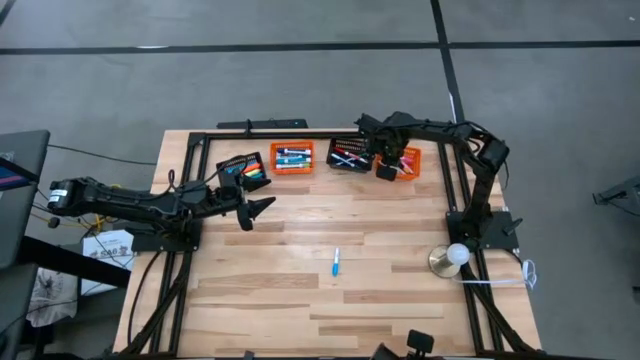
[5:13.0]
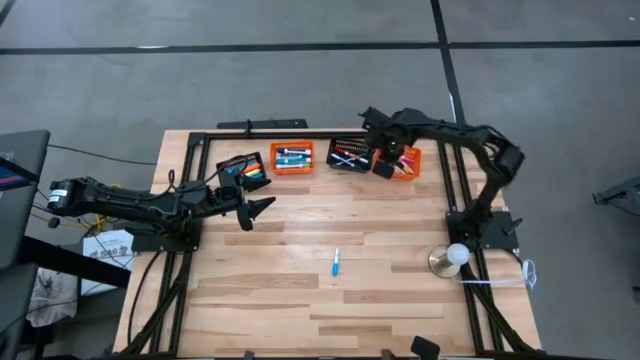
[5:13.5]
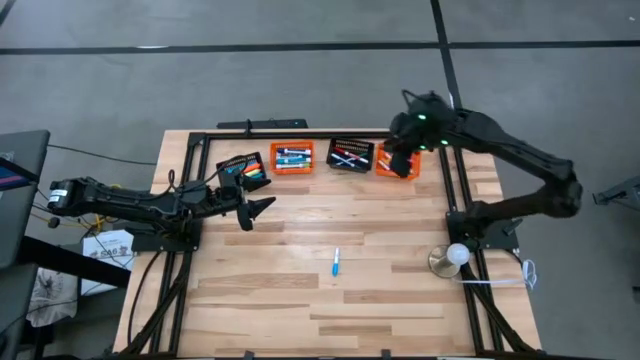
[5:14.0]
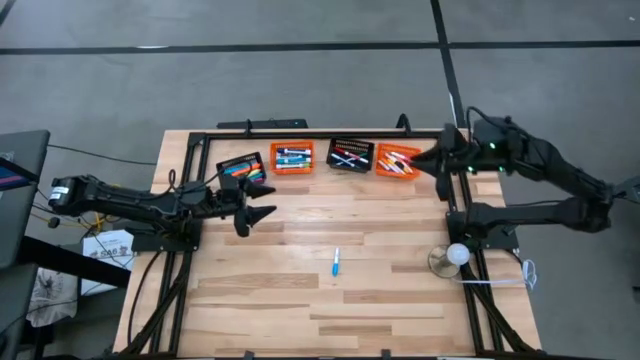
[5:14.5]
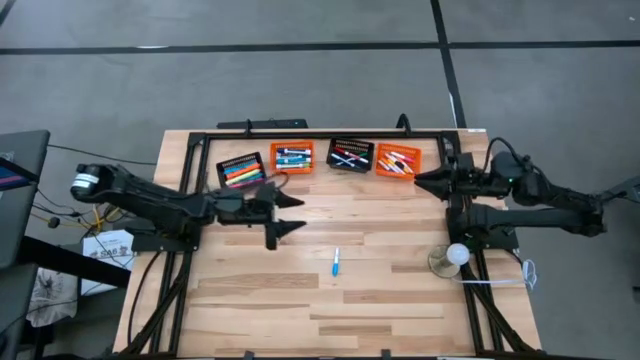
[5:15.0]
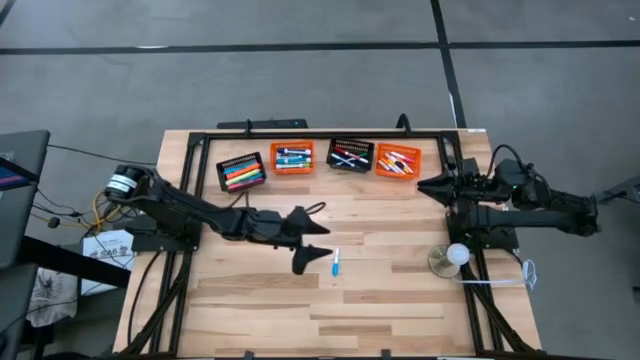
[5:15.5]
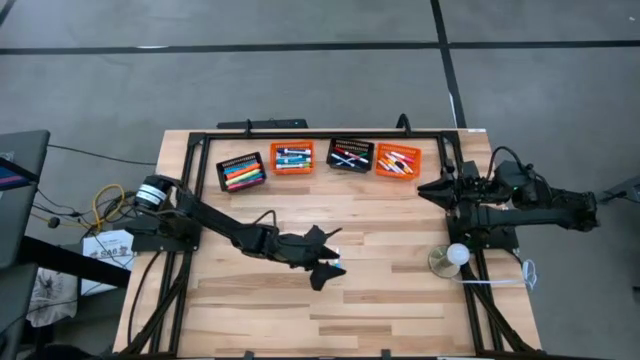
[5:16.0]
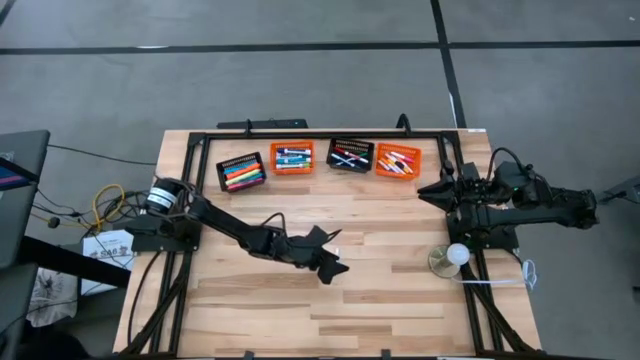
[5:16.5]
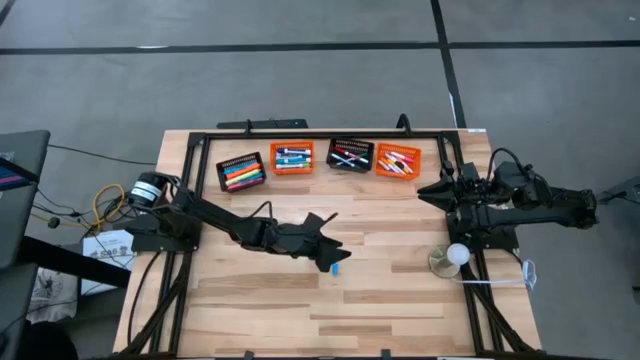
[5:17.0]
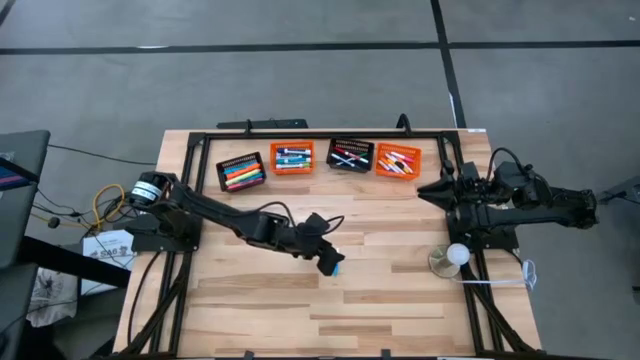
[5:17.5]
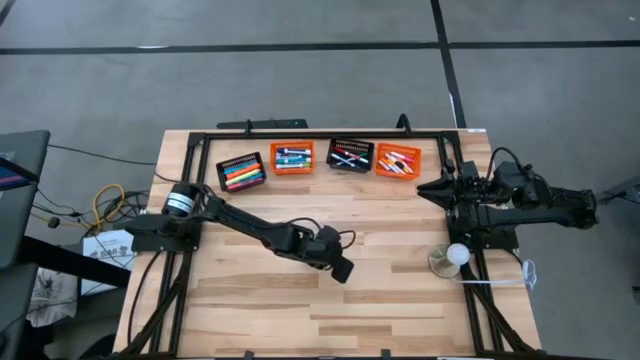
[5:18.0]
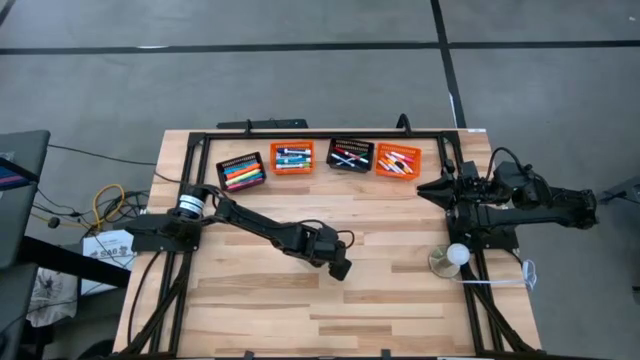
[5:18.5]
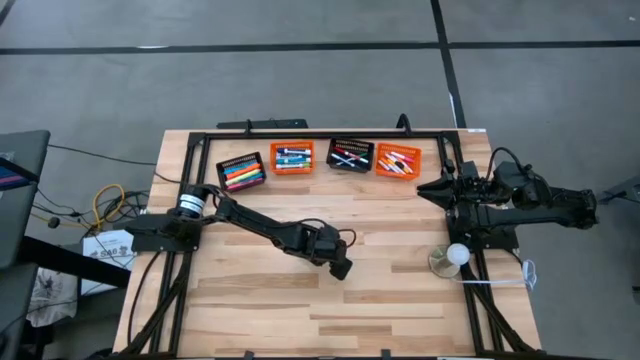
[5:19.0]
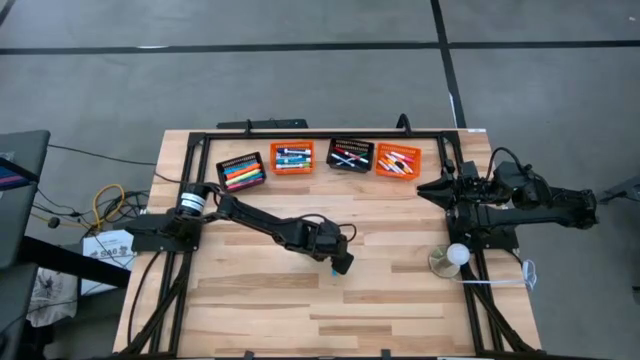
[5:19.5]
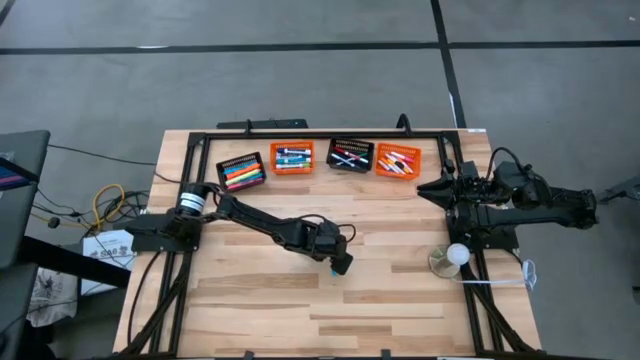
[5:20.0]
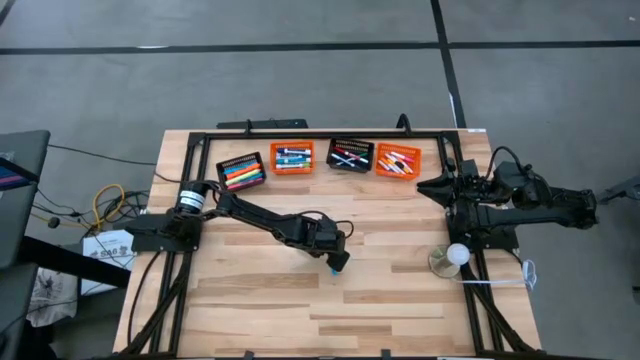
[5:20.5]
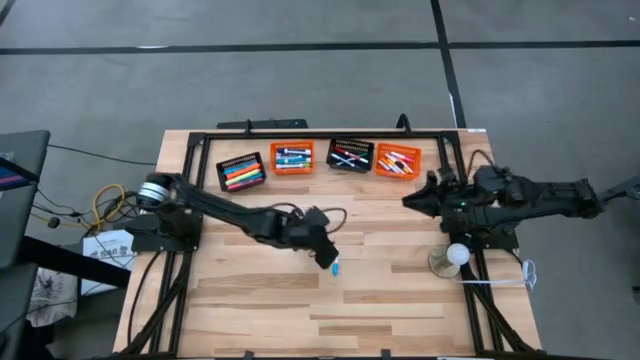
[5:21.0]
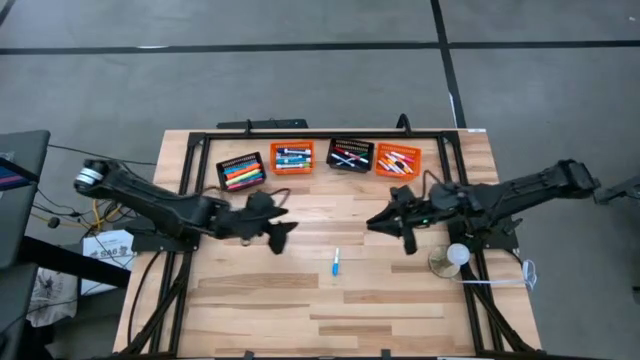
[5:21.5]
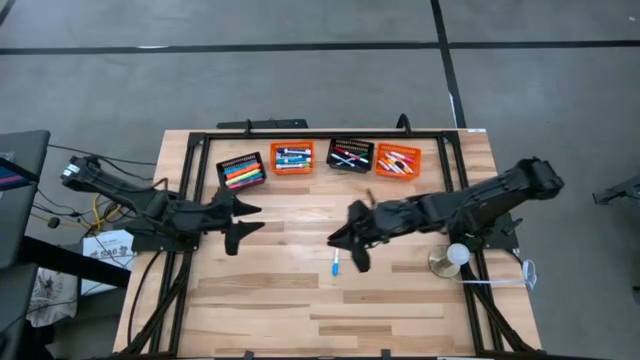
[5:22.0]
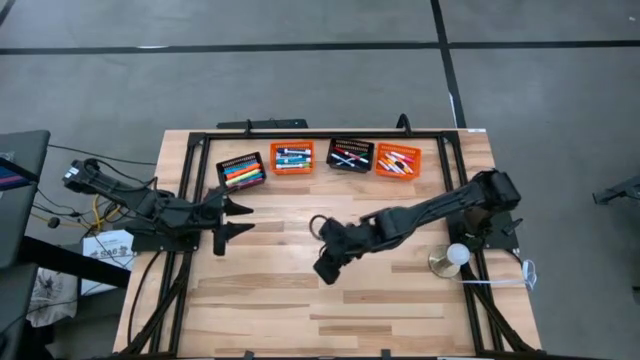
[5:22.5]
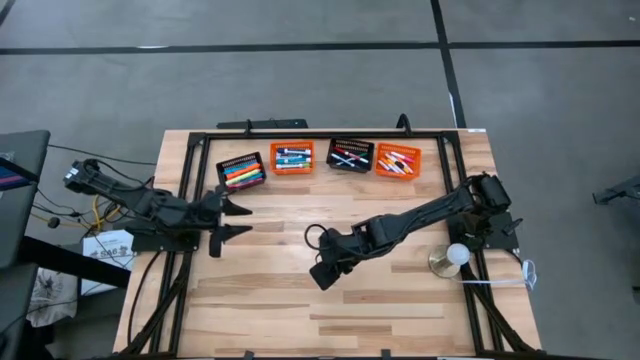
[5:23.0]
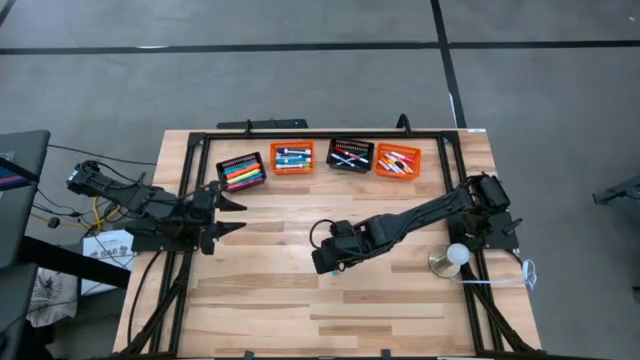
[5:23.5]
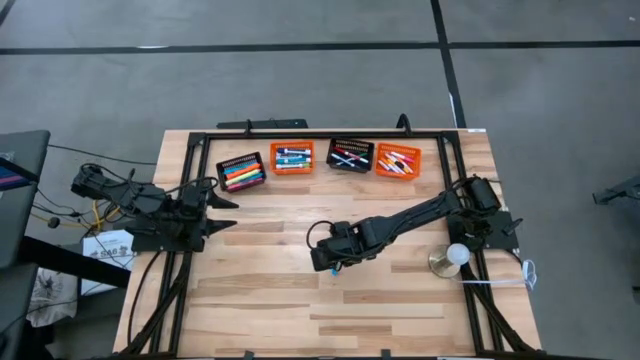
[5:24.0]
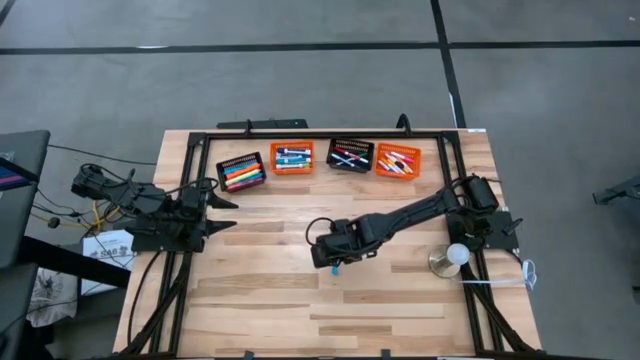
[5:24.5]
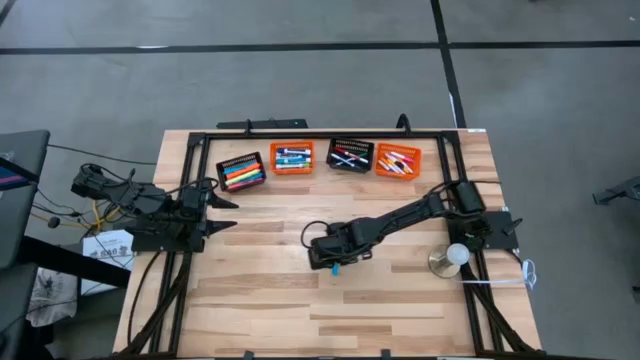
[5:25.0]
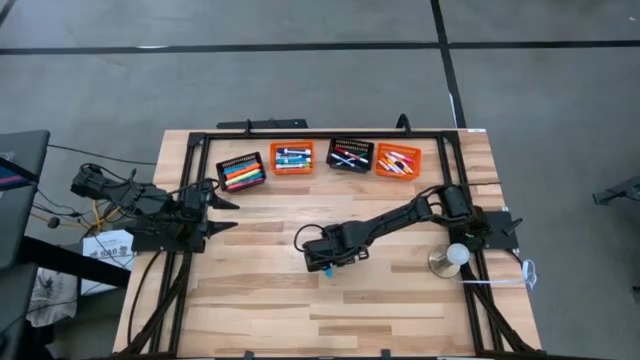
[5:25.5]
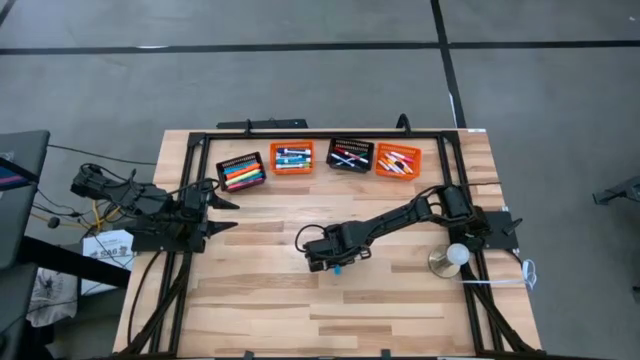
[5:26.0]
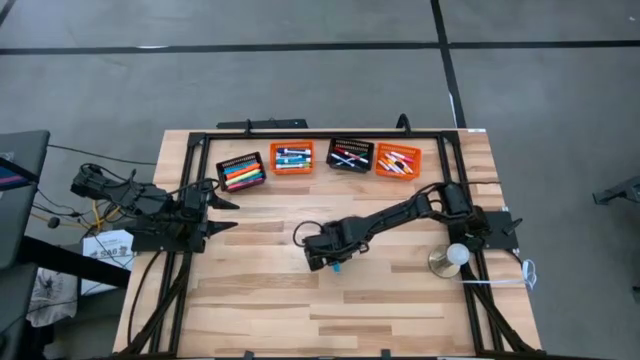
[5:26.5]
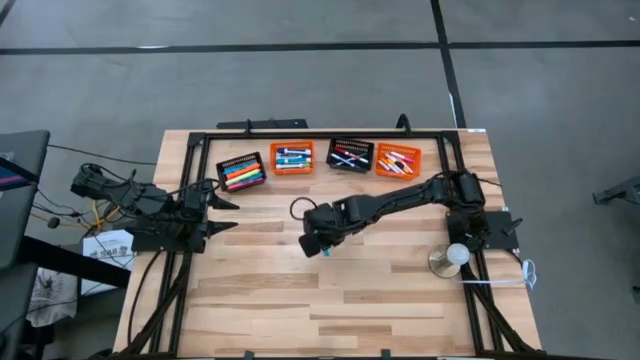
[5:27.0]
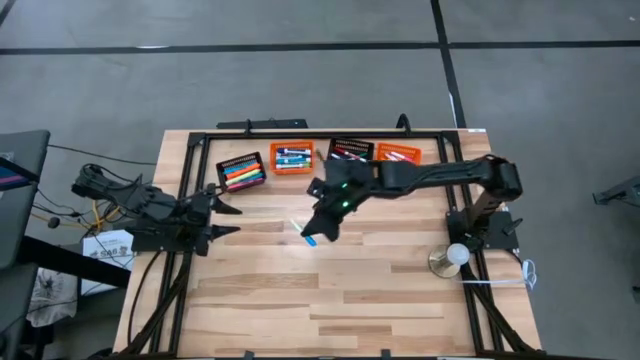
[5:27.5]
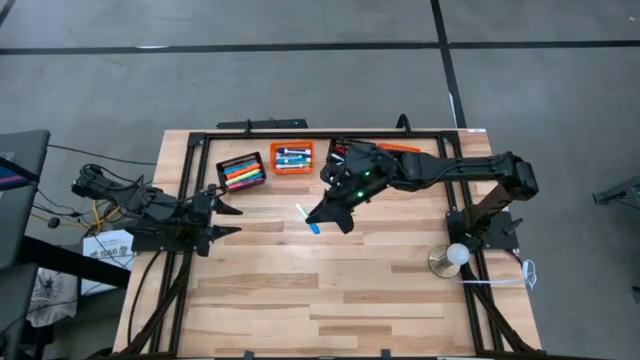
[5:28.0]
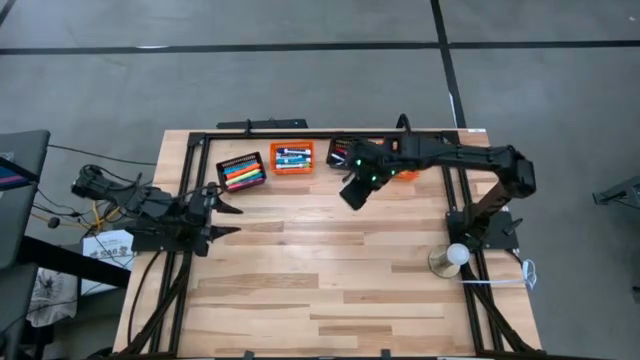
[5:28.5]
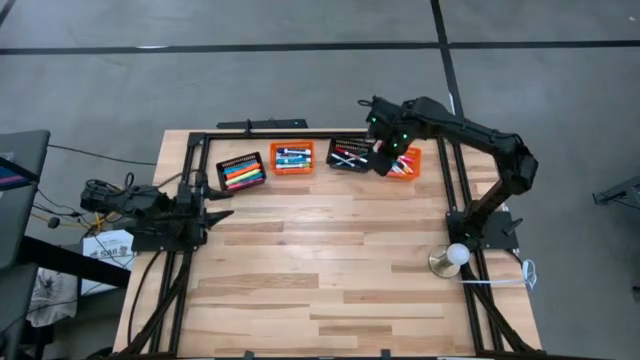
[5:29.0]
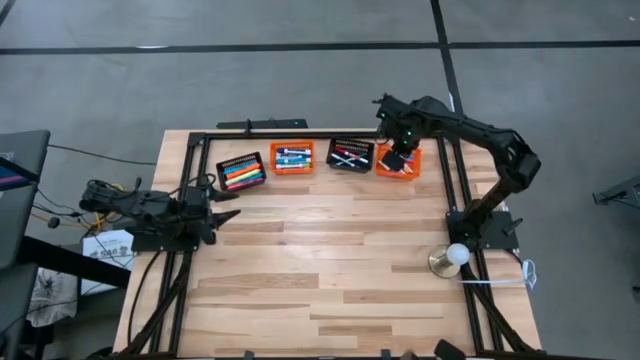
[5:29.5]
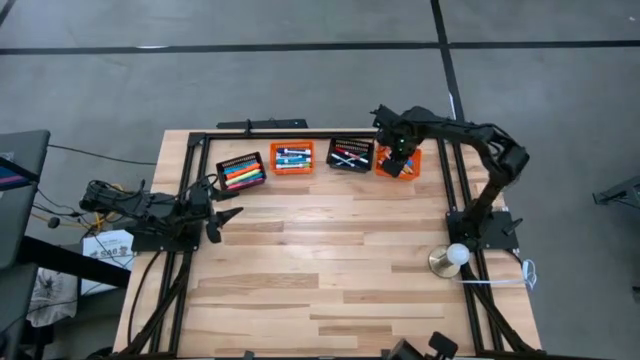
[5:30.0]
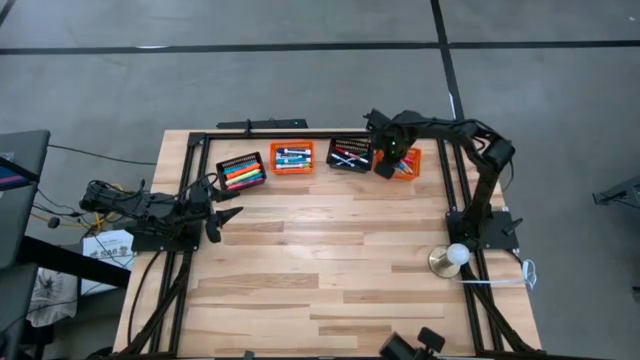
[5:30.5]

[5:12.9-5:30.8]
Task: Pick & Place Markers
Put the small light blue highlighter pen into the right orange bin

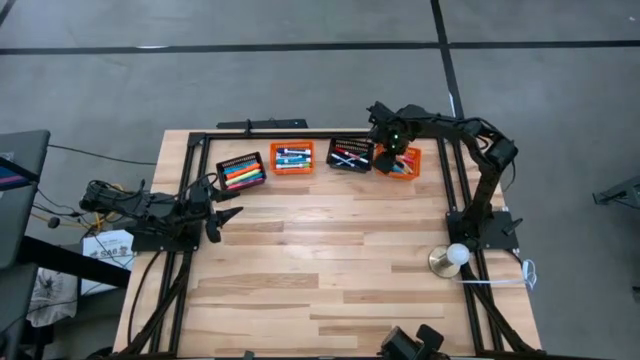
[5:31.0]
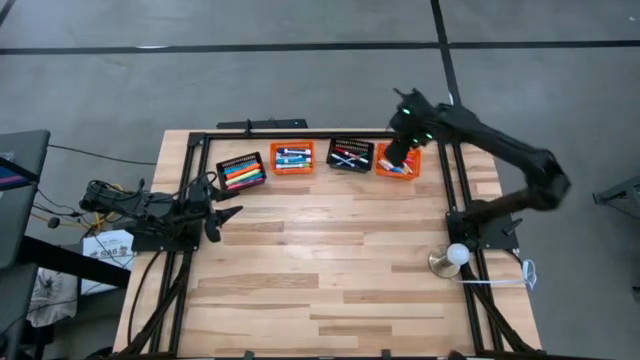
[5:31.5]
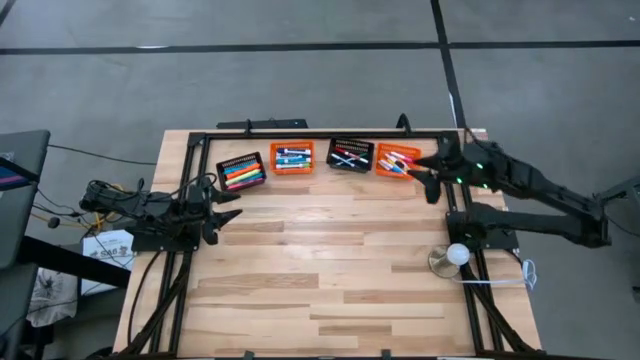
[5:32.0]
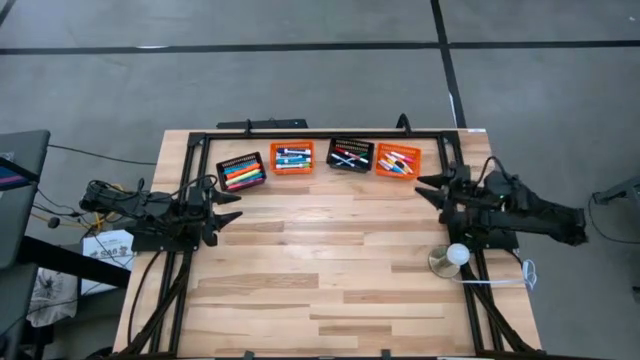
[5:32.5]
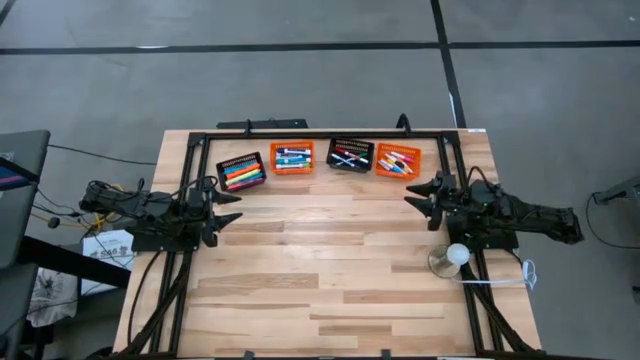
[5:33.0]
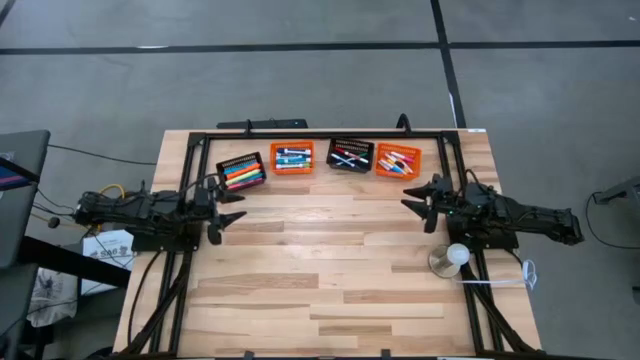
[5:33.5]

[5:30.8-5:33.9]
Return to Home Position
